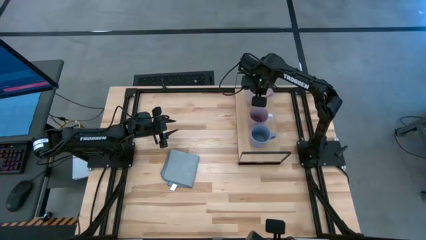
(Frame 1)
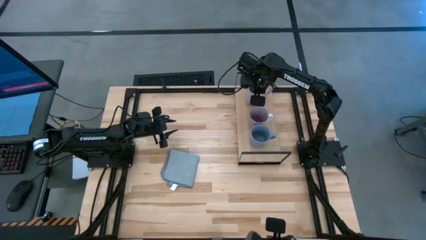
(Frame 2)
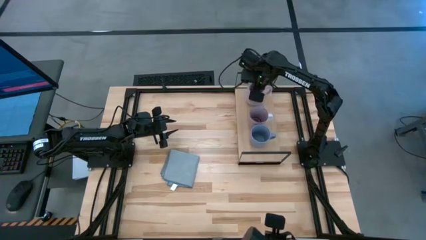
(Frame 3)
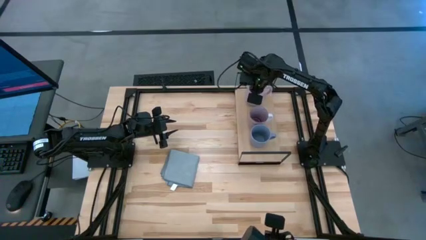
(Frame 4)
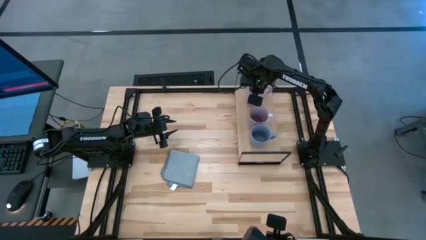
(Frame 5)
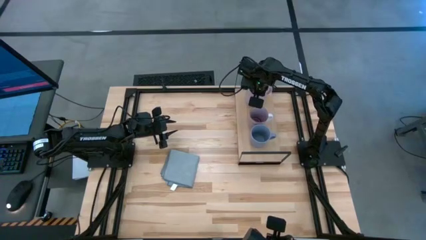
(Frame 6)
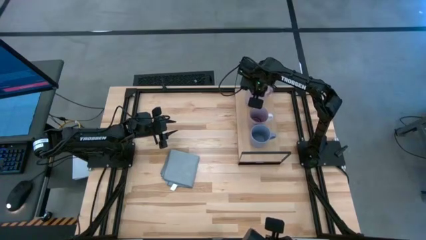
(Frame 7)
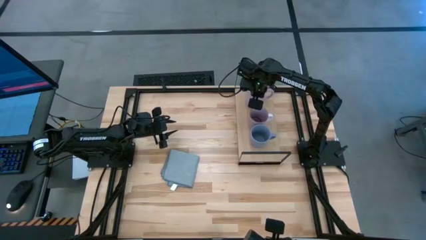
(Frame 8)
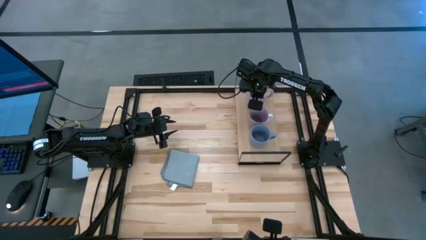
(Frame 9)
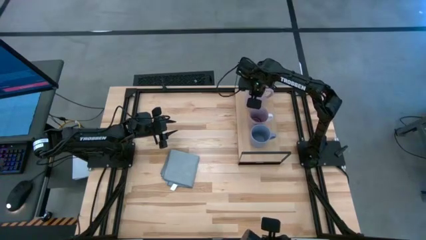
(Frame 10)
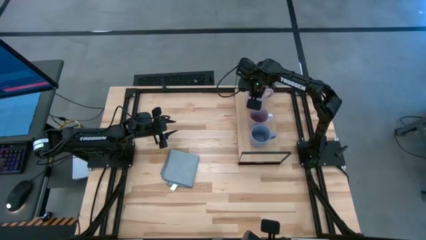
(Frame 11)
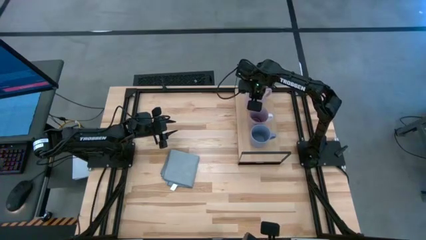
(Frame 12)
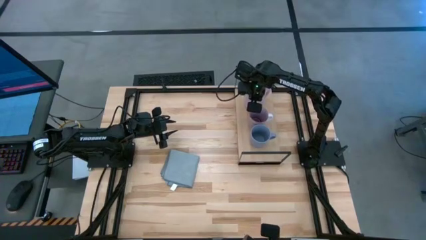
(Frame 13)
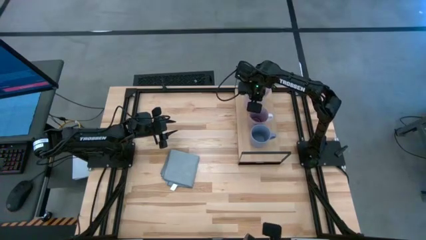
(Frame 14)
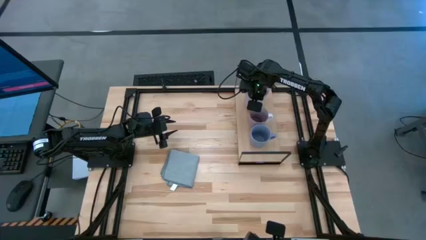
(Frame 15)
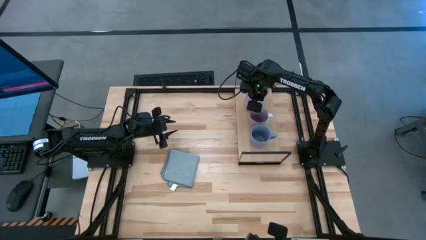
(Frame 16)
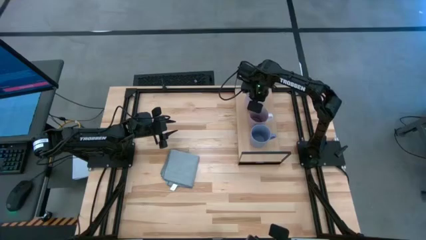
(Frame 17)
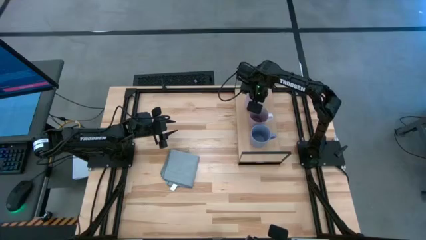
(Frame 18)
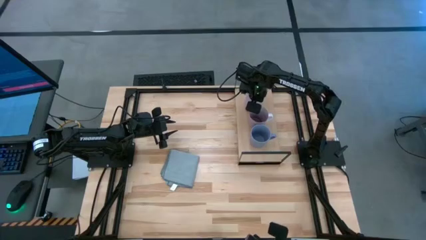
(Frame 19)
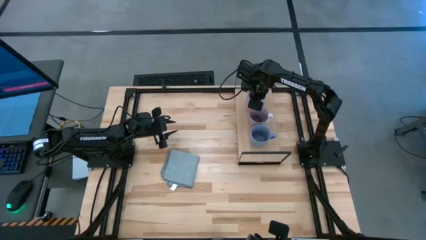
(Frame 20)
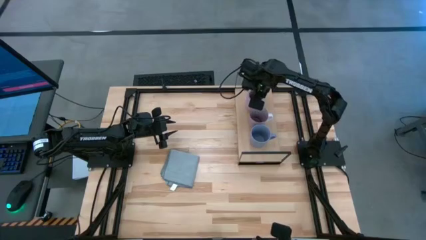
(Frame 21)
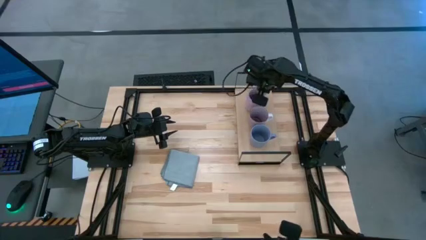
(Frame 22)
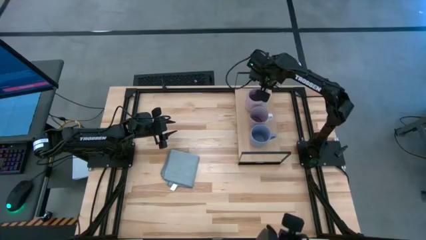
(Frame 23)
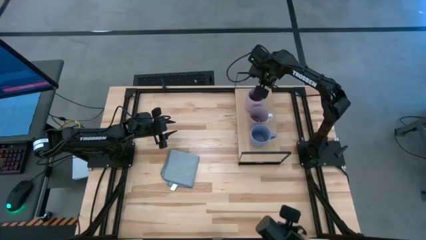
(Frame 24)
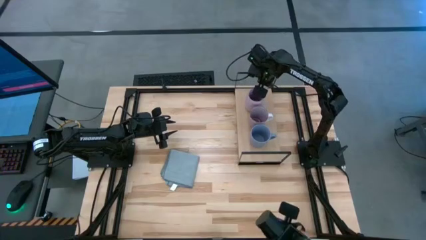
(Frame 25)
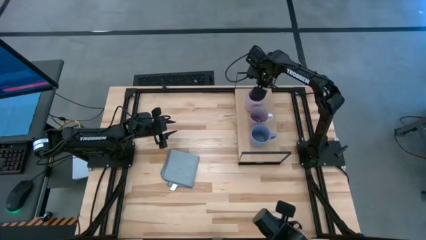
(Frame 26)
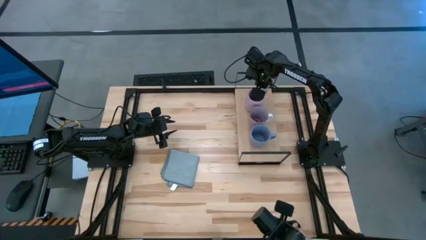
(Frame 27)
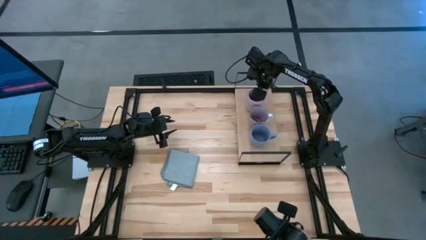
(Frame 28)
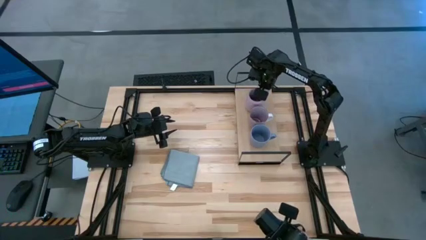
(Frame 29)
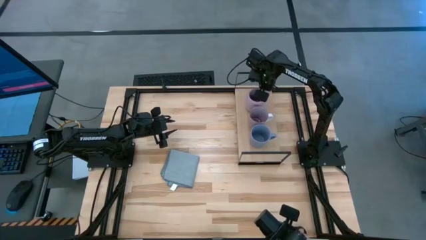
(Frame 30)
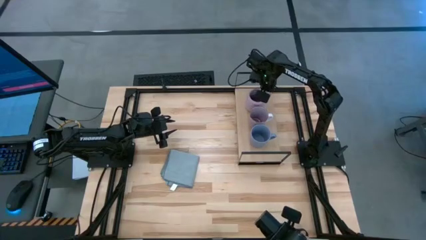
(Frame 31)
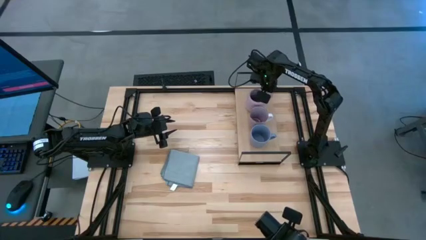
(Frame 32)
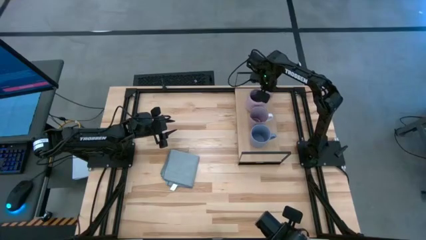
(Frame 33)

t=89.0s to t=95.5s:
Task: Stack small to large cups/mugs on shelf
Put the purple mug on the shelf

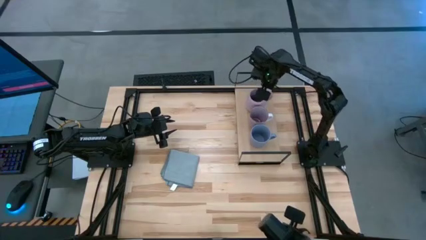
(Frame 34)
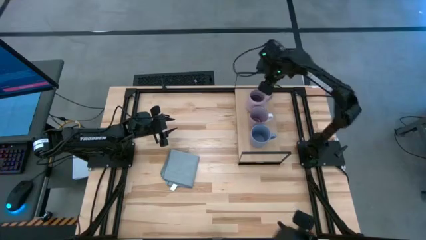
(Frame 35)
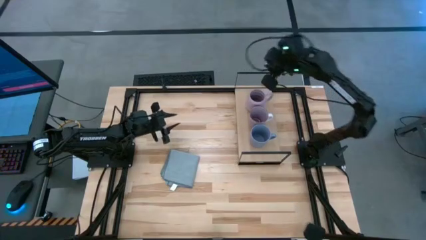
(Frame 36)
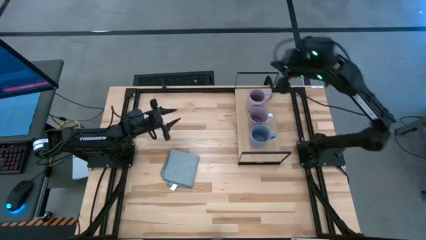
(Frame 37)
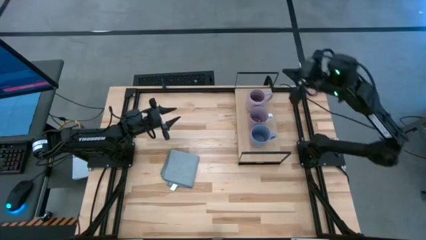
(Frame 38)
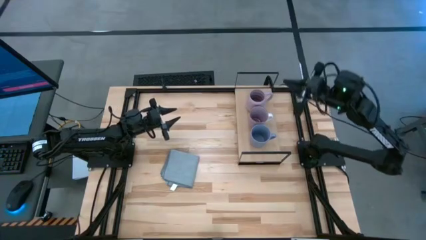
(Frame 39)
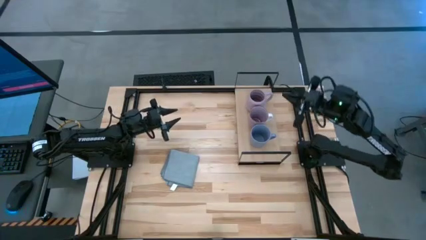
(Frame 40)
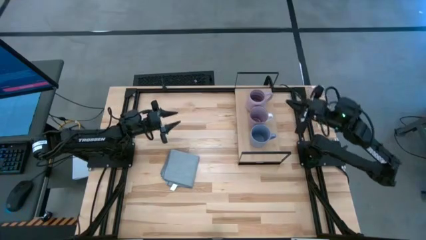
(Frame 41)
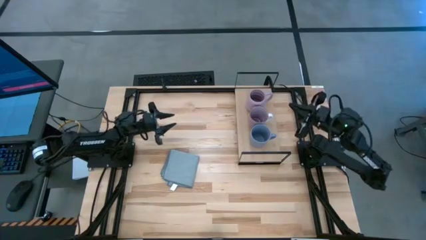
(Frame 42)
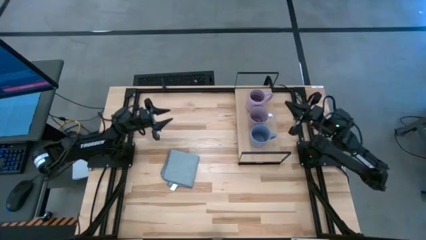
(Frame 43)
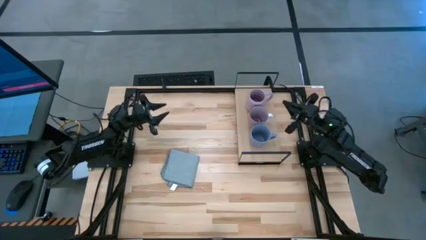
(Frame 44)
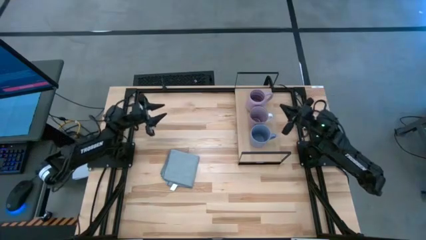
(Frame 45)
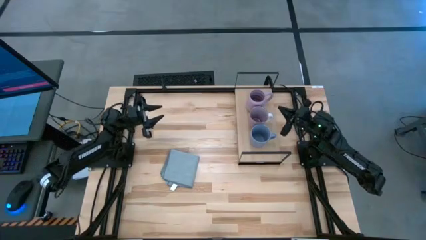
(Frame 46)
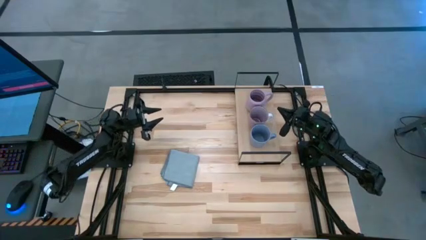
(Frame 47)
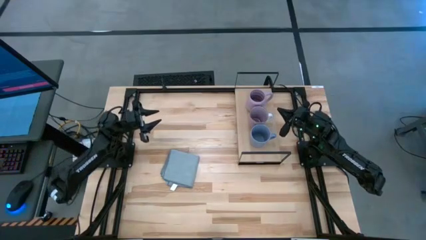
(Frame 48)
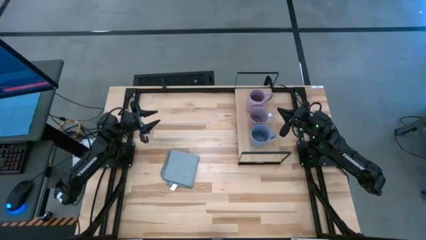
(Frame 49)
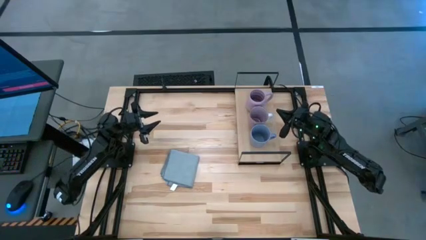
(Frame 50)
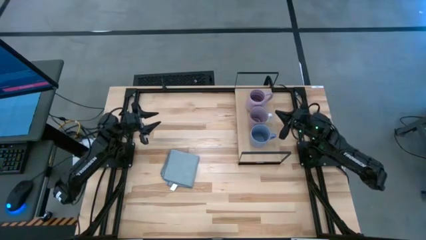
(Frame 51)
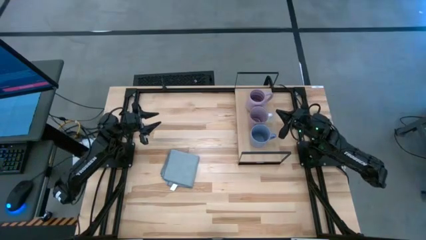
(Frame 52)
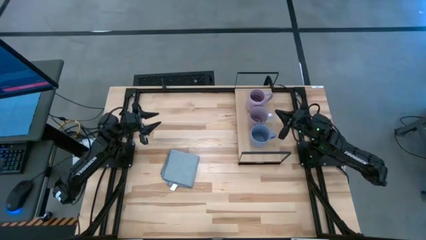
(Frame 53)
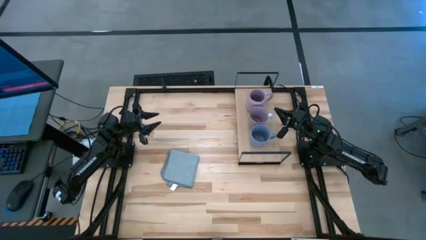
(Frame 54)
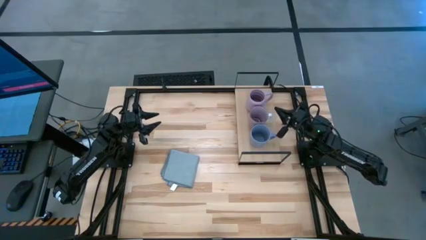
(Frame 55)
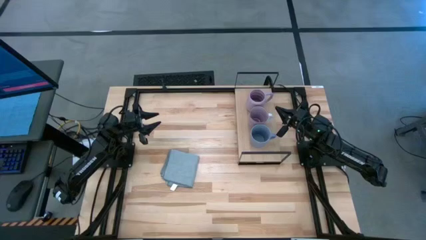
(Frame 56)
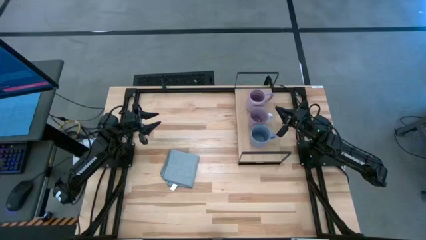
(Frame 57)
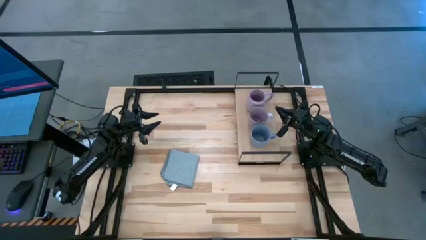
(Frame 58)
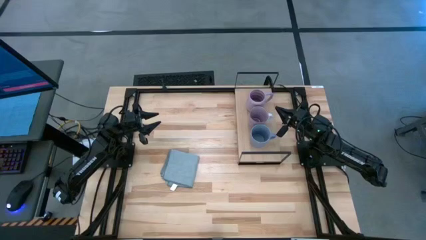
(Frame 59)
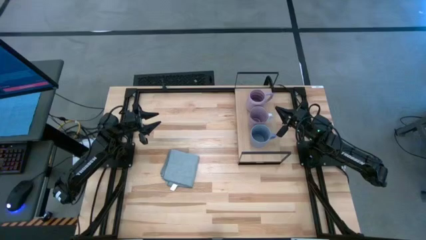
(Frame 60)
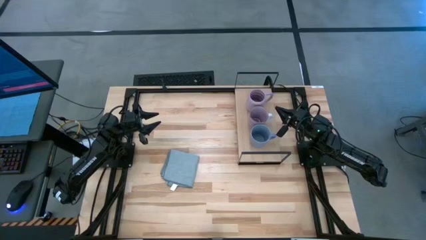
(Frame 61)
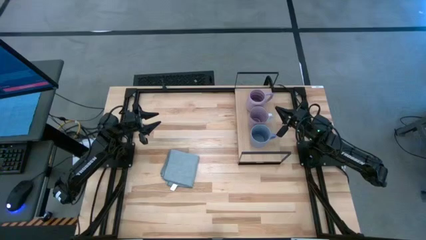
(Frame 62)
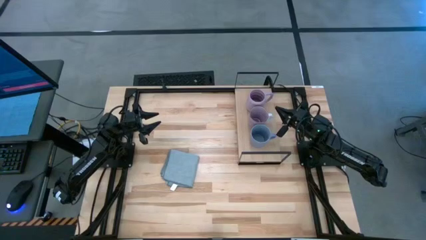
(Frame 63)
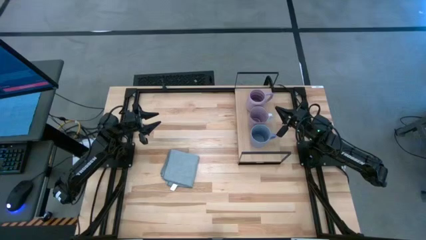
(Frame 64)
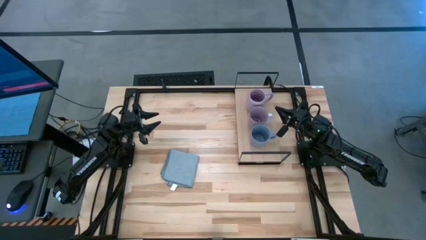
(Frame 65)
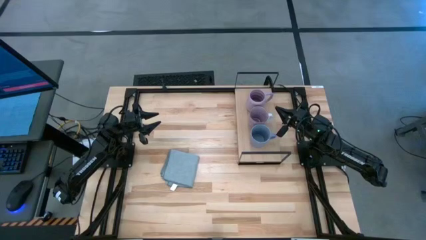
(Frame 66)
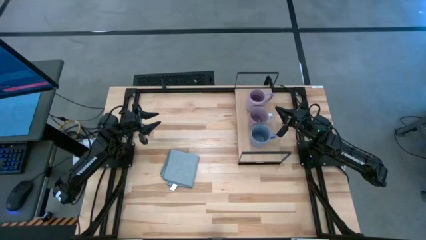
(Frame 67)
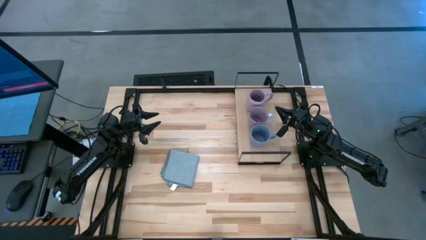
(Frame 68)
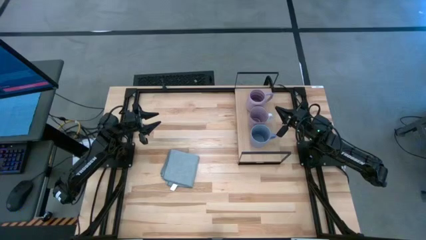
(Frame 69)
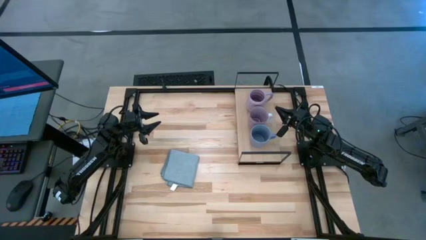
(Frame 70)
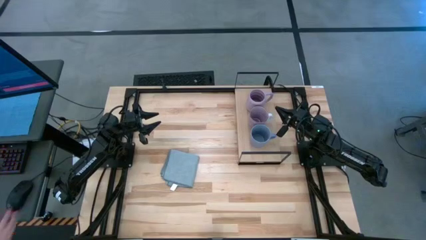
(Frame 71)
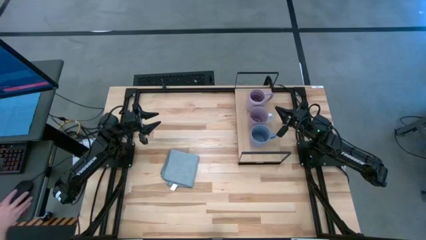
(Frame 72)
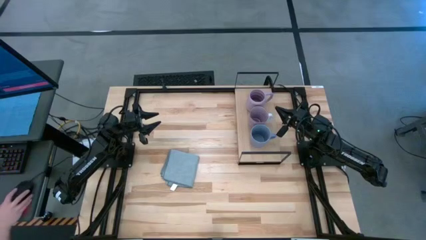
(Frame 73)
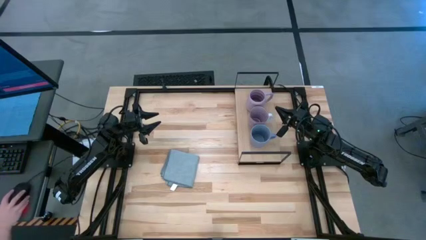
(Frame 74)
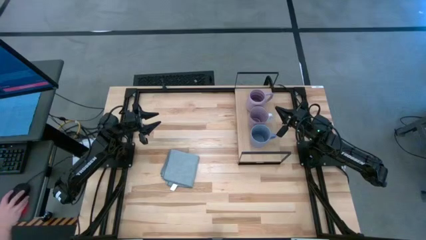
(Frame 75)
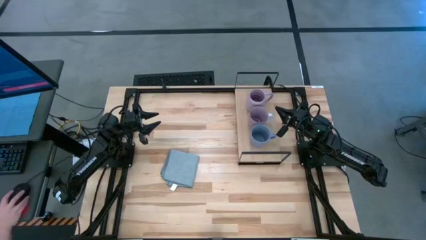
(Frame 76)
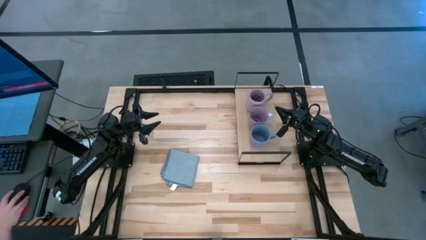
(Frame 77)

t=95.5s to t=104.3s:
Return to Home Position
